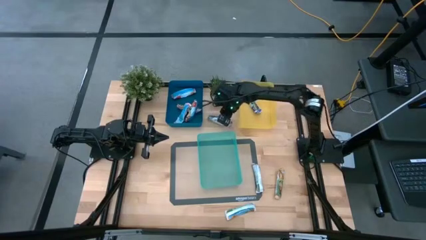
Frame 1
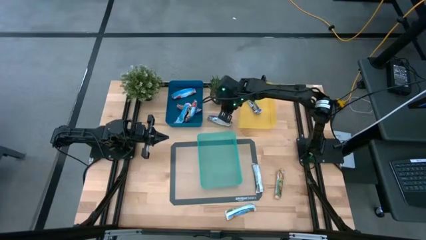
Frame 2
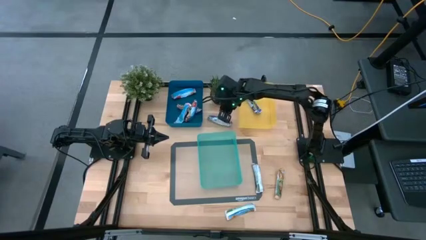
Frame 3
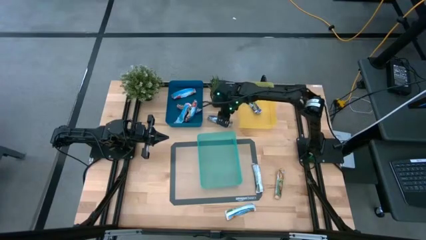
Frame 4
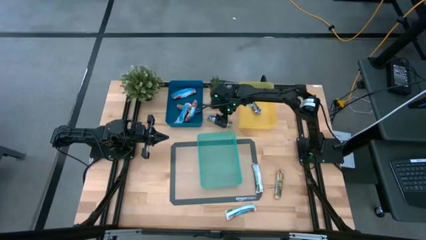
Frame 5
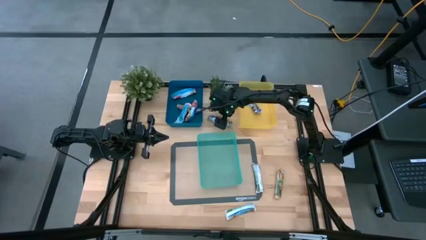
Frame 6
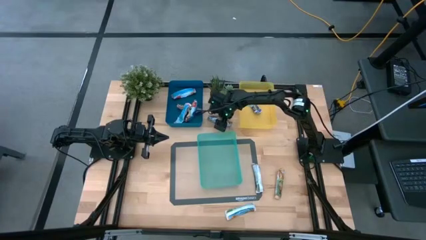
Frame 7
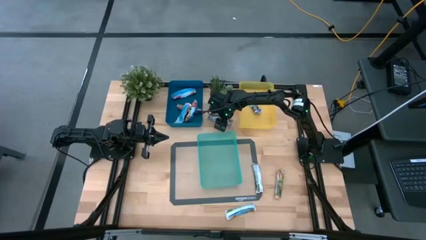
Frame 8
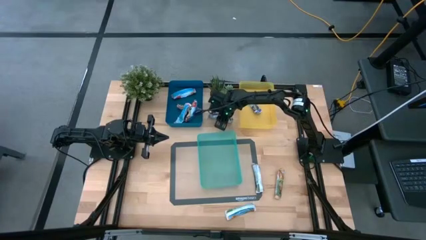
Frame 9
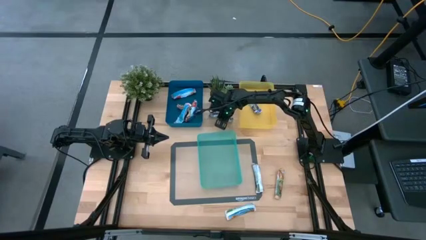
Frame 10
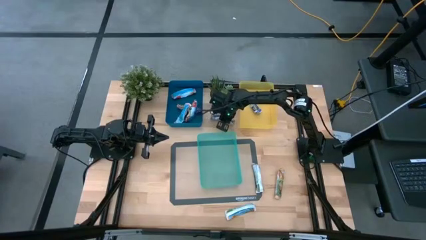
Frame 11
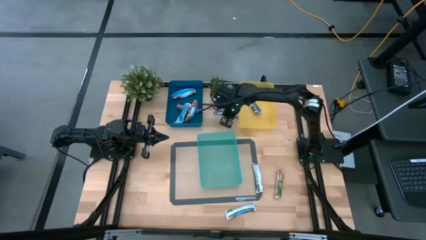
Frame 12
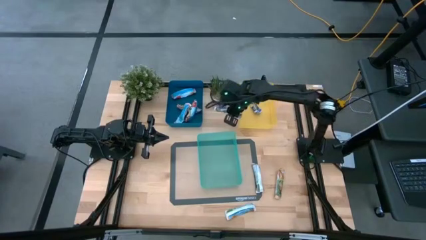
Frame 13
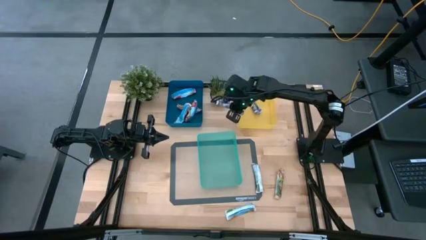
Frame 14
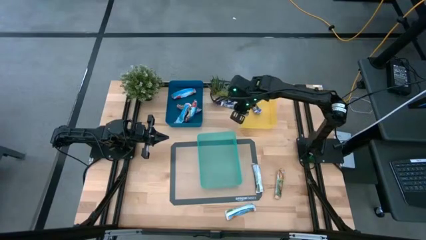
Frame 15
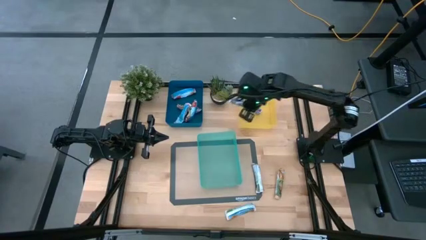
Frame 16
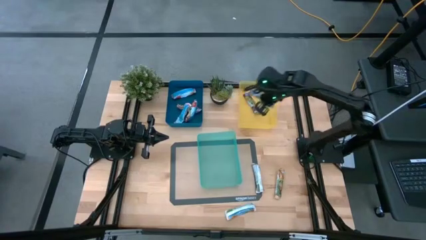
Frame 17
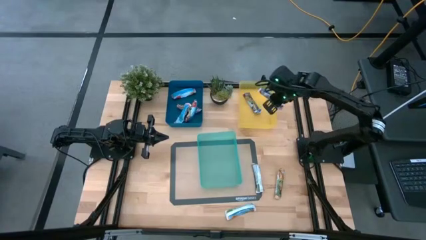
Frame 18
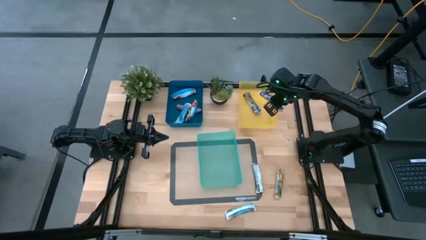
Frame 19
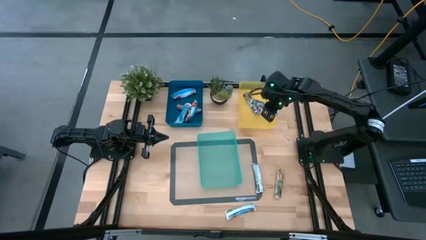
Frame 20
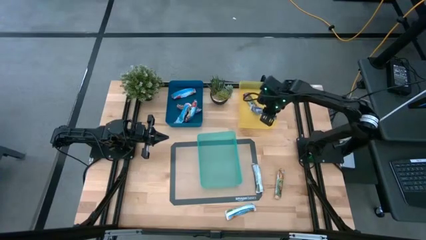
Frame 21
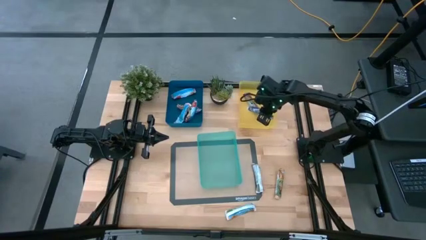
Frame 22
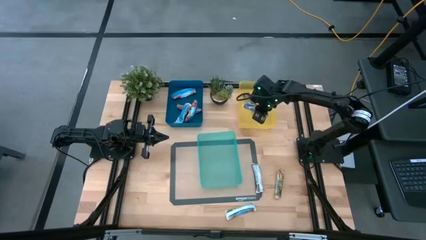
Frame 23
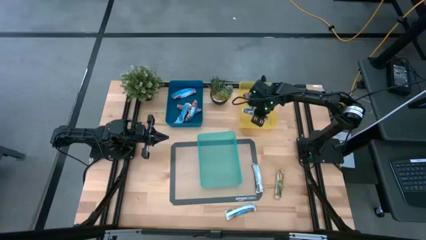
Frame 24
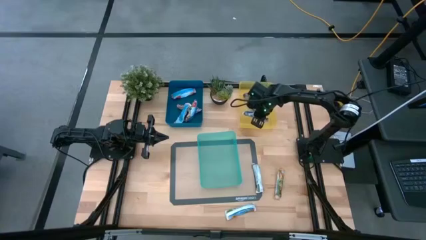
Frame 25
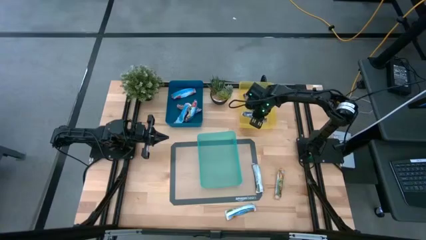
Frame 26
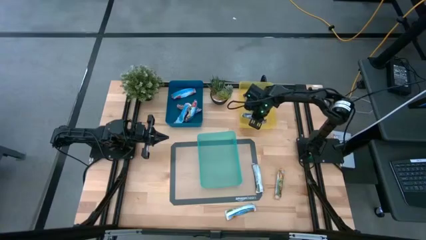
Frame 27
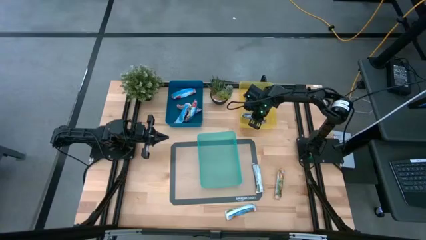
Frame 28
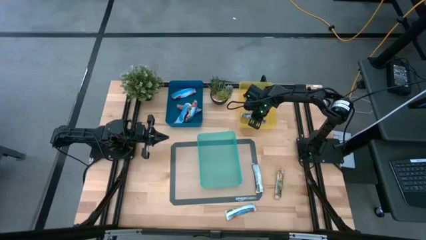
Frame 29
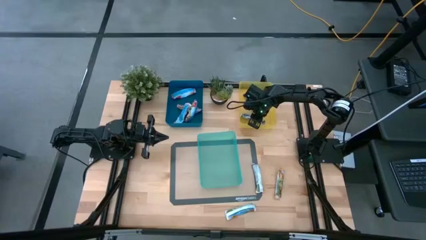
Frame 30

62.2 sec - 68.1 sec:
Task: Pick and place Granola Bars by type
Put the blue granola bar into the yellow bin

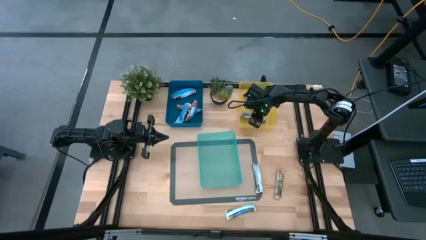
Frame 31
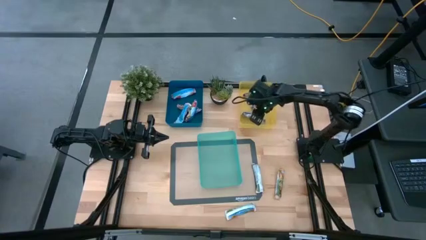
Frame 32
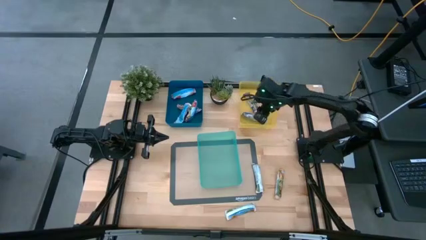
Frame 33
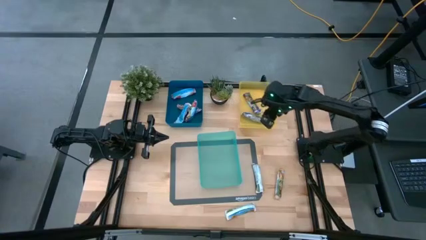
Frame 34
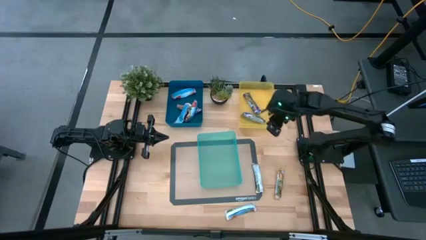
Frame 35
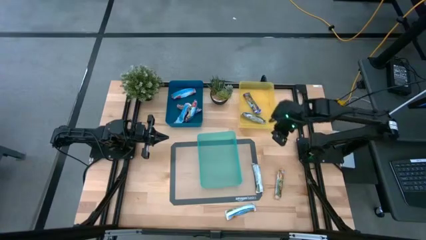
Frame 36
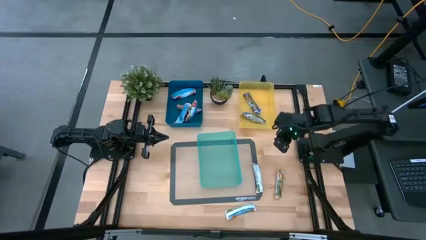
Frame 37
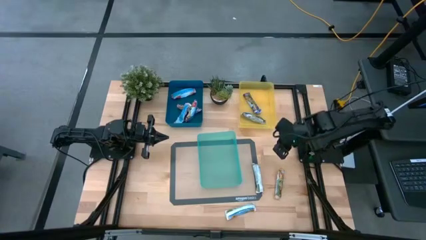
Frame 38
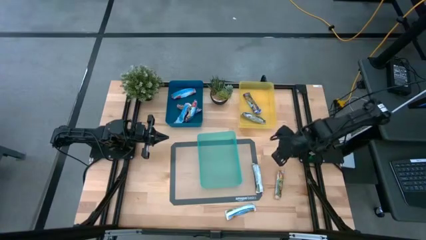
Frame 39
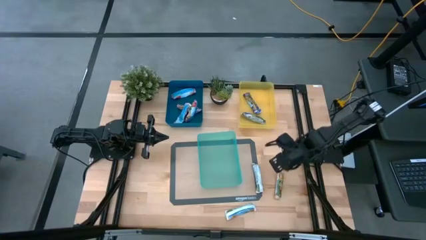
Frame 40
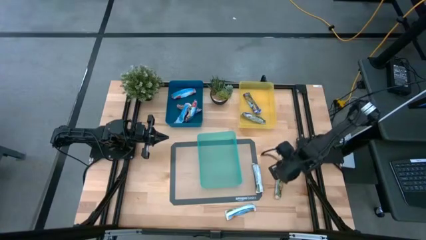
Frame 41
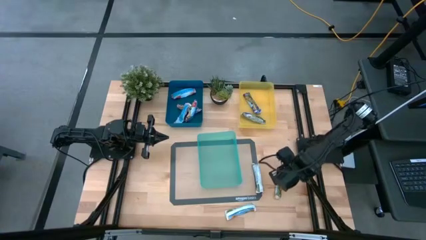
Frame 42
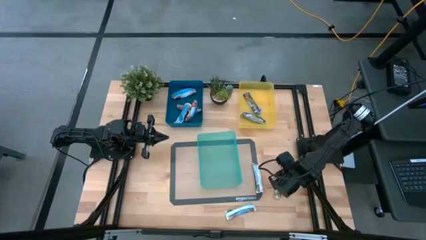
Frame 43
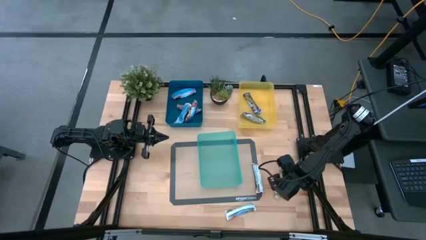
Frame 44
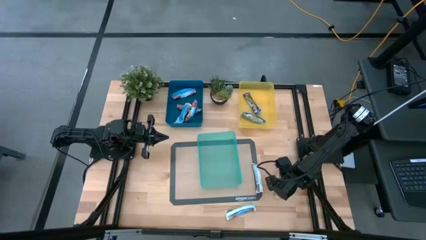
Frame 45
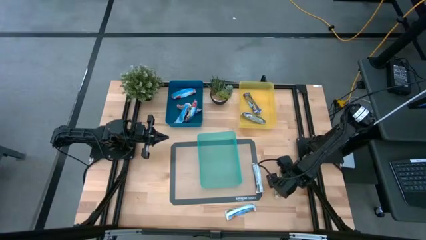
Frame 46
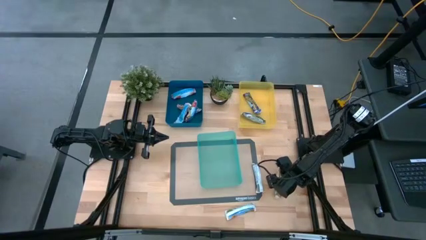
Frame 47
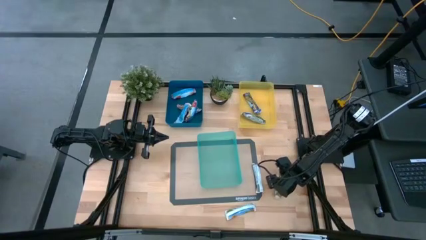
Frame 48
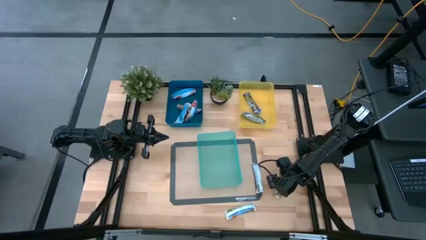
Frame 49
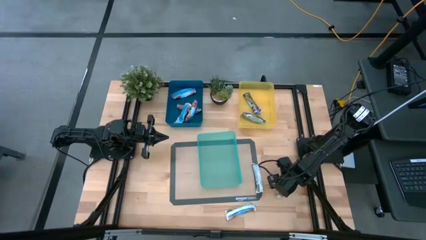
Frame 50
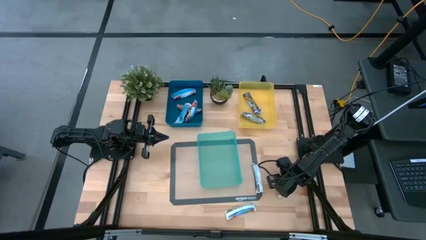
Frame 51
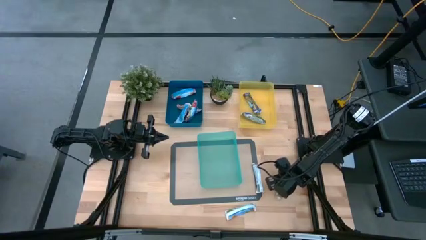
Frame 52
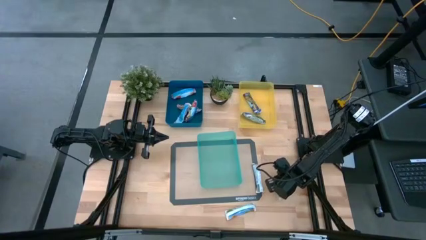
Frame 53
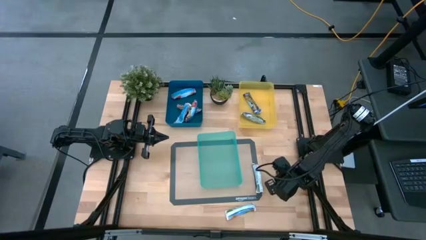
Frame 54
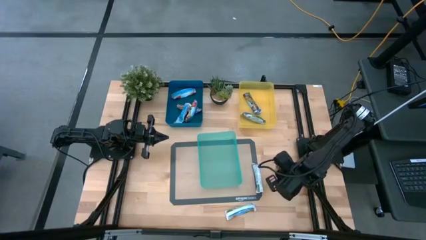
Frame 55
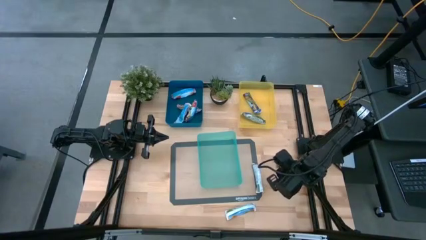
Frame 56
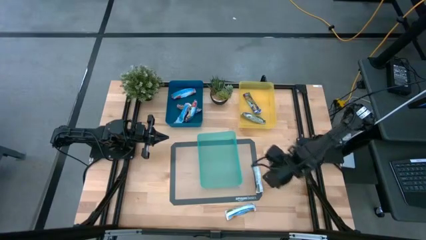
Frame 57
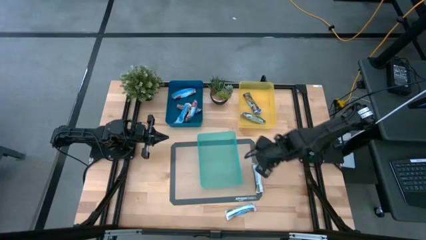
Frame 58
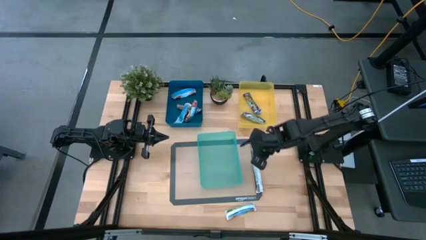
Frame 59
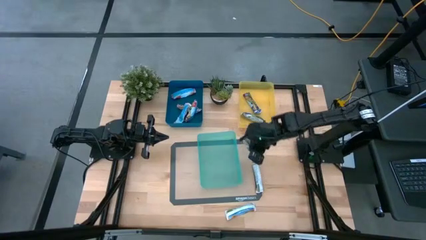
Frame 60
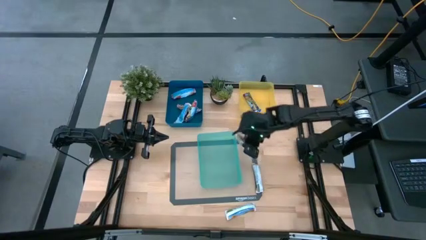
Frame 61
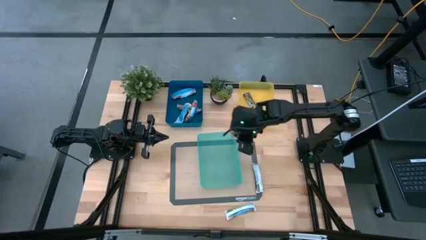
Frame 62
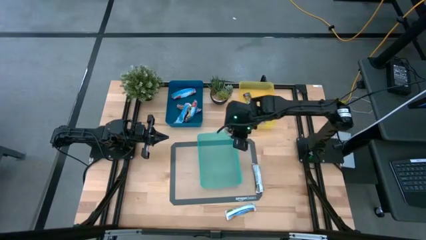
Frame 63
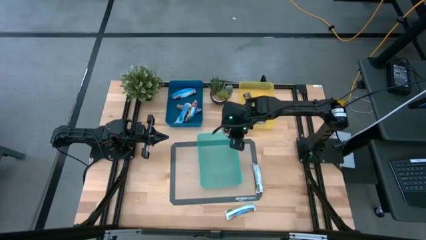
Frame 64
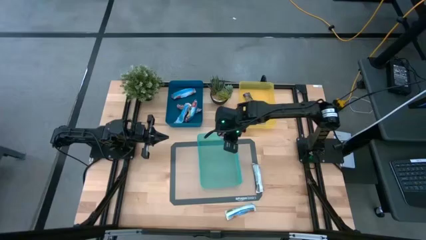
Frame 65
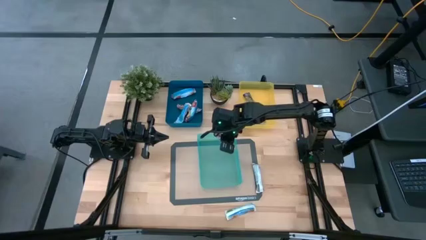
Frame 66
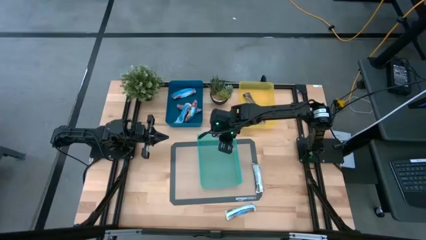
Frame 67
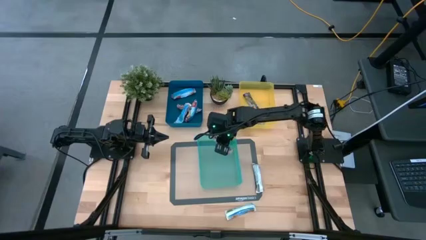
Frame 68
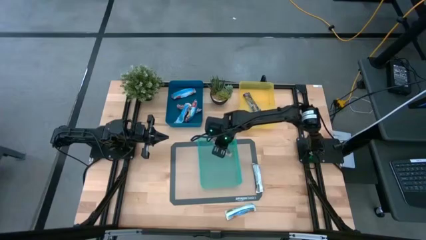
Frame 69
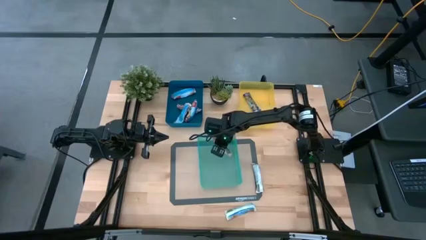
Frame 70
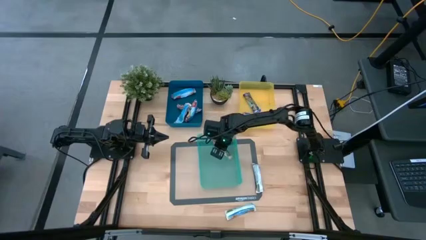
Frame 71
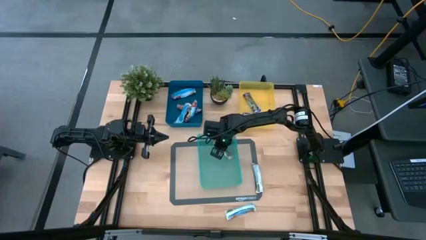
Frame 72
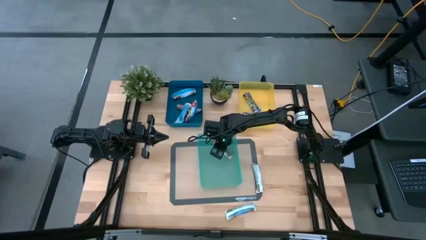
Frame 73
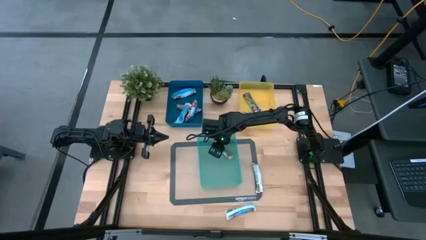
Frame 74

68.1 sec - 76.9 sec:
Put the yellow granola bar into the green bin

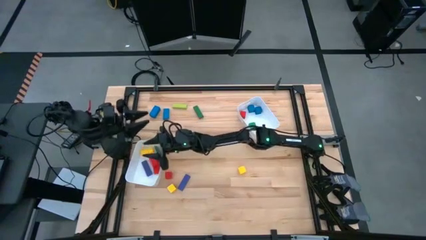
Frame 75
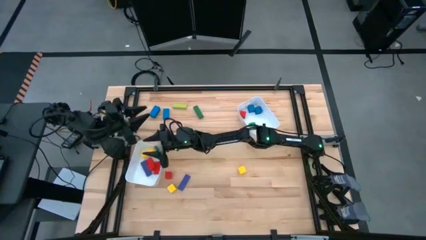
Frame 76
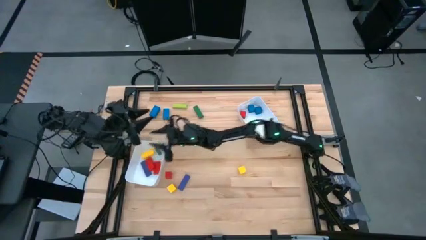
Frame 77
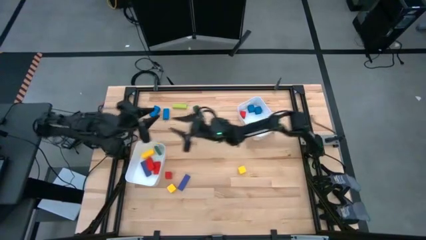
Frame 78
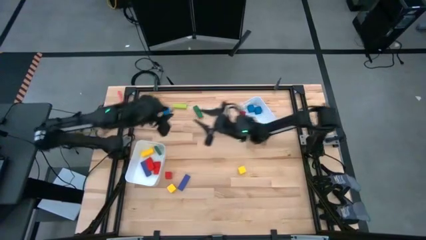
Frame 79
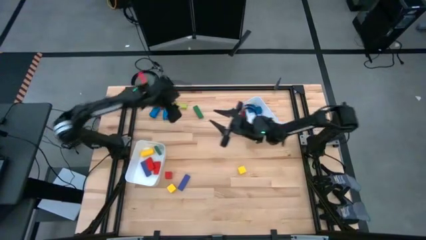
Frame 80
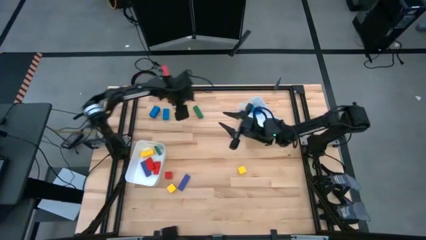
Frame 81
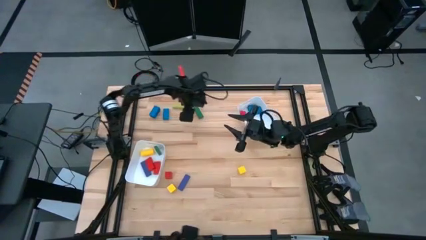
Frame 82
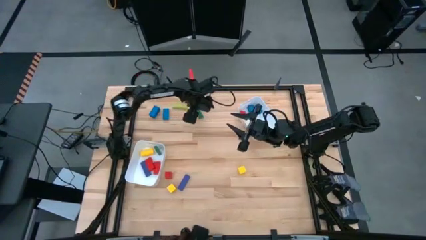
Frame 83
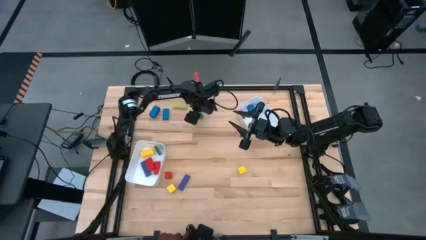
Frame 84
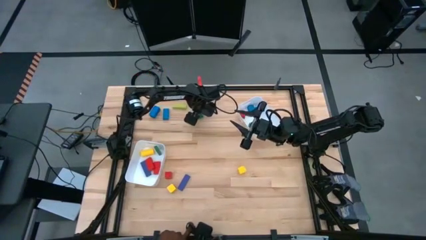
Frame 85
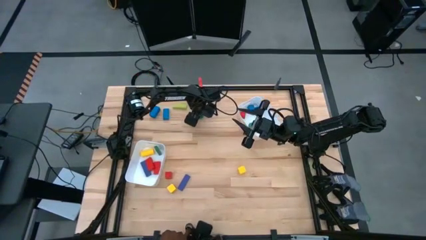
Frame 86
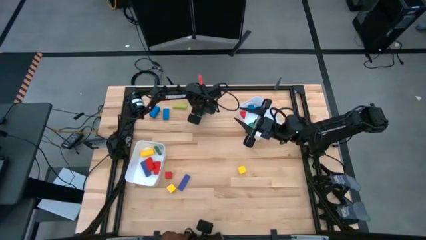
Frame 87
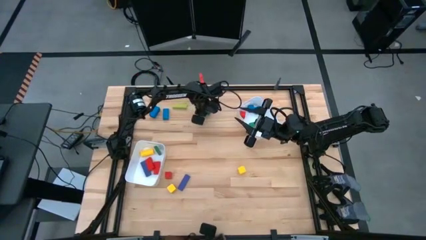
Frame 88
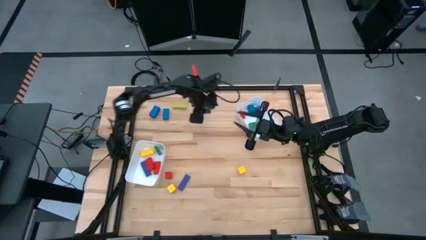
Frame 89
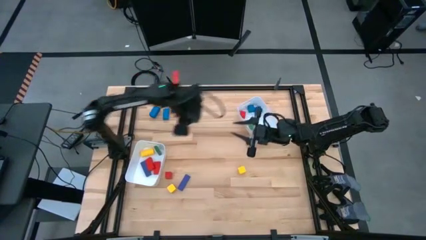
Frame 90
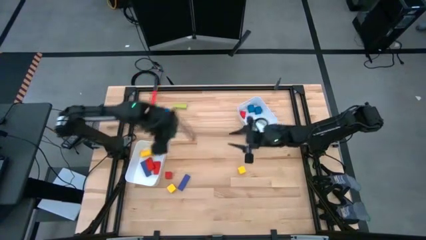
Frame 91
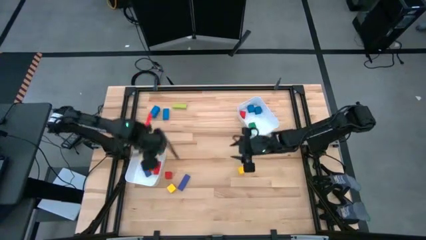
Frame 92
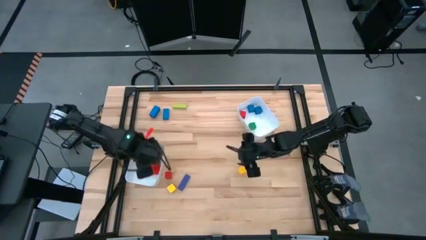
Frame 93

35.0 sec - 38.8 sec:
Task: Sort blocks by size
Put the large green block into the left white bin
